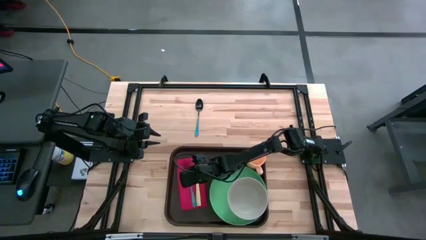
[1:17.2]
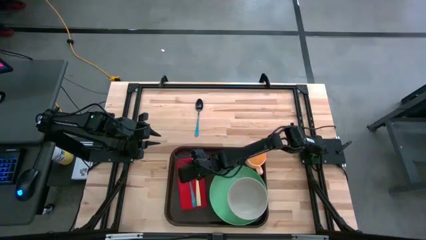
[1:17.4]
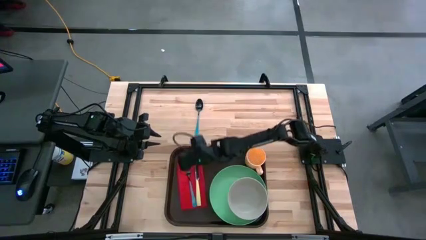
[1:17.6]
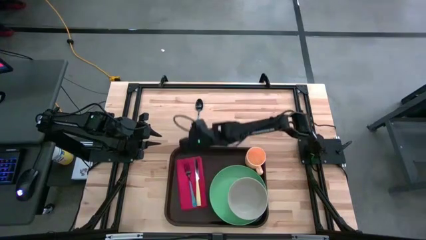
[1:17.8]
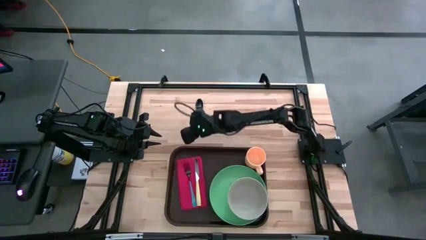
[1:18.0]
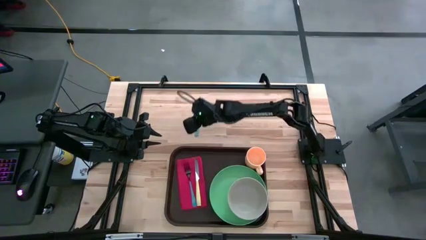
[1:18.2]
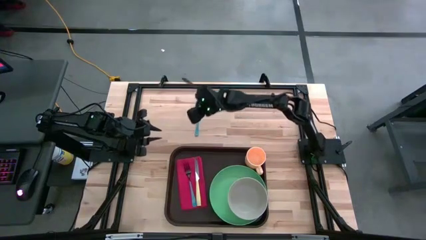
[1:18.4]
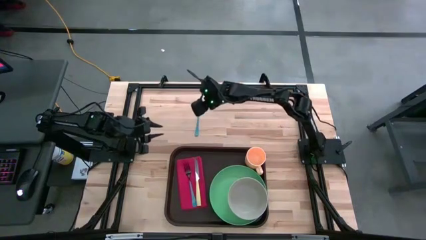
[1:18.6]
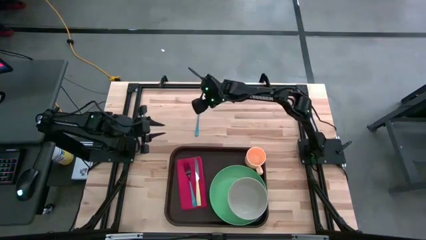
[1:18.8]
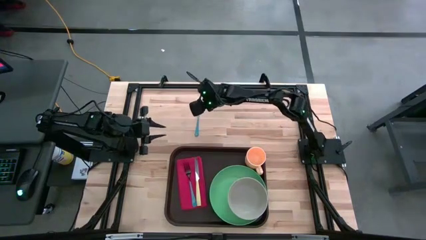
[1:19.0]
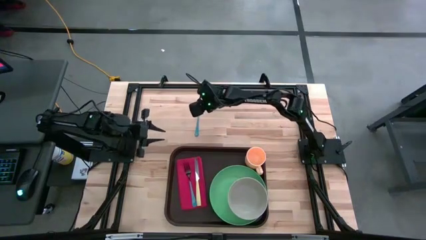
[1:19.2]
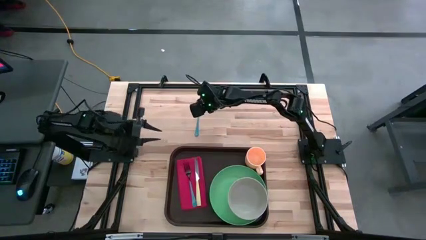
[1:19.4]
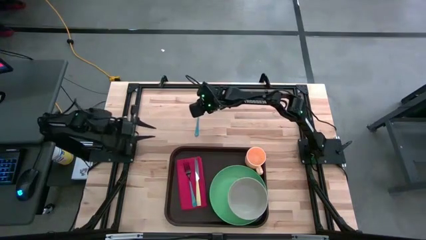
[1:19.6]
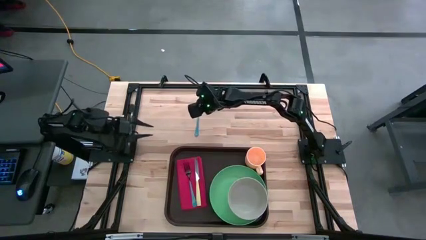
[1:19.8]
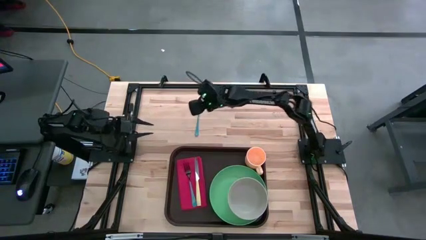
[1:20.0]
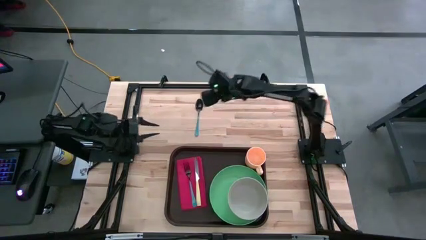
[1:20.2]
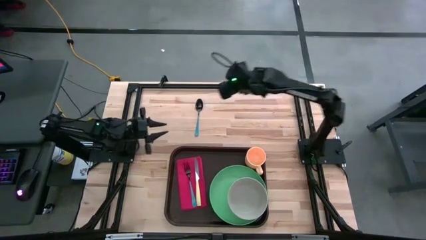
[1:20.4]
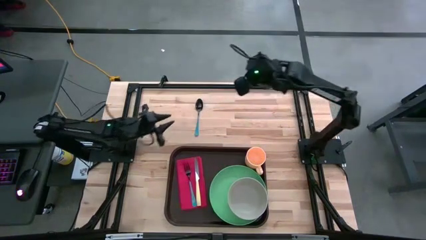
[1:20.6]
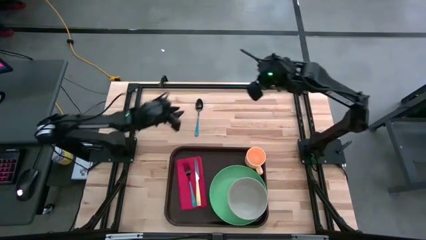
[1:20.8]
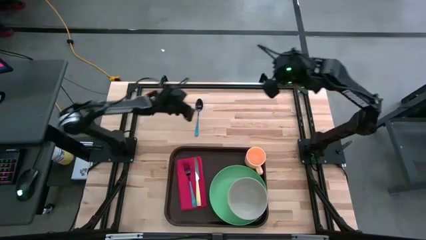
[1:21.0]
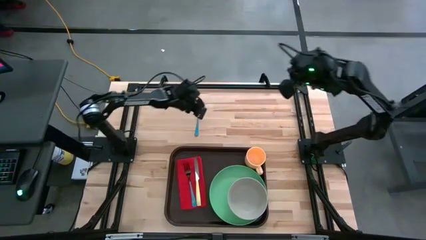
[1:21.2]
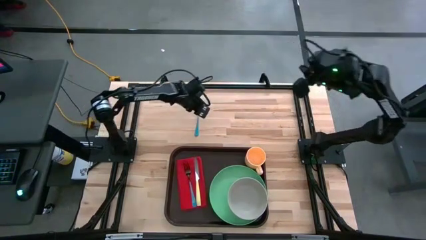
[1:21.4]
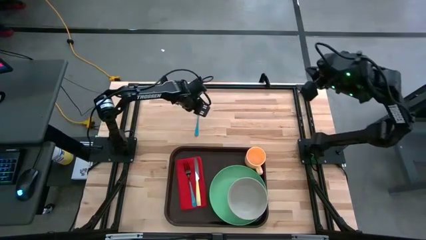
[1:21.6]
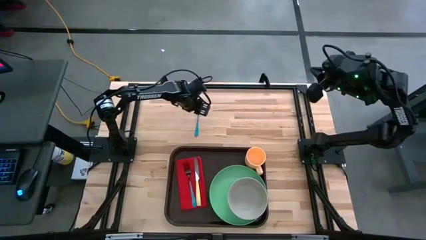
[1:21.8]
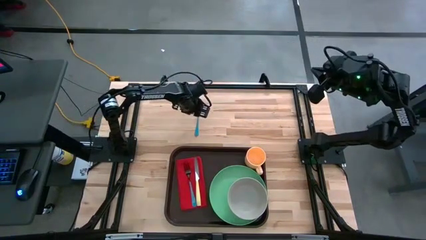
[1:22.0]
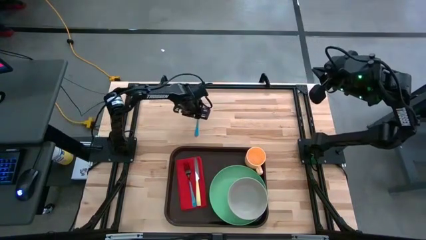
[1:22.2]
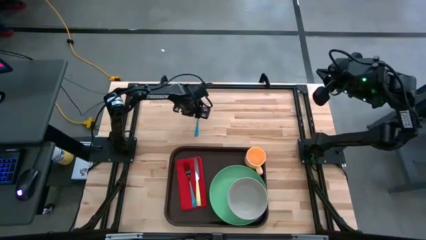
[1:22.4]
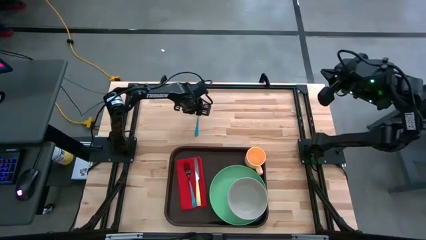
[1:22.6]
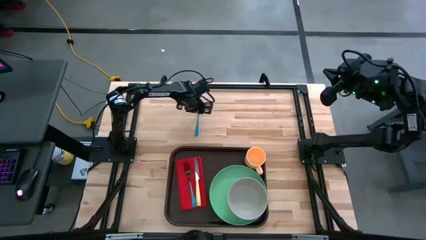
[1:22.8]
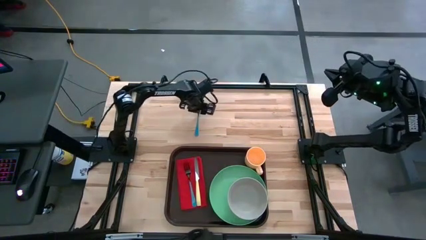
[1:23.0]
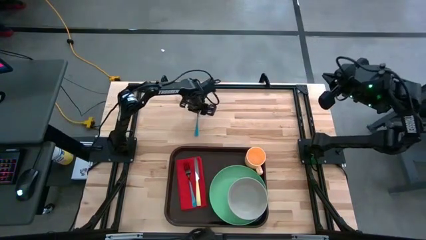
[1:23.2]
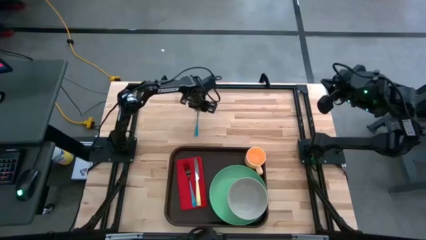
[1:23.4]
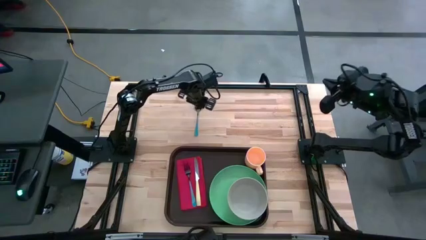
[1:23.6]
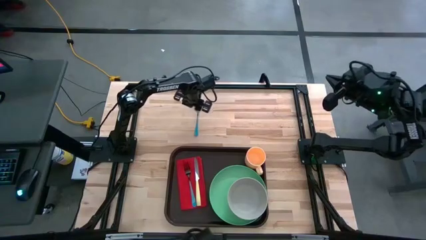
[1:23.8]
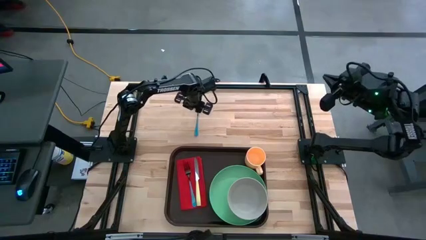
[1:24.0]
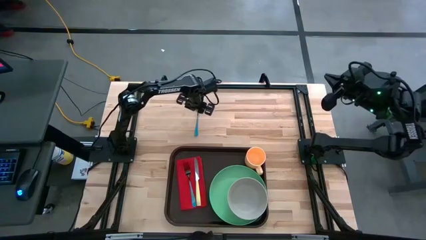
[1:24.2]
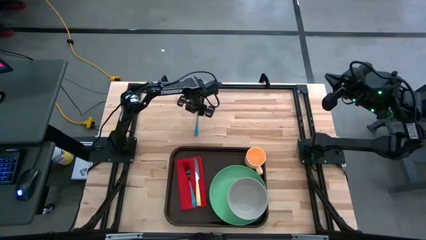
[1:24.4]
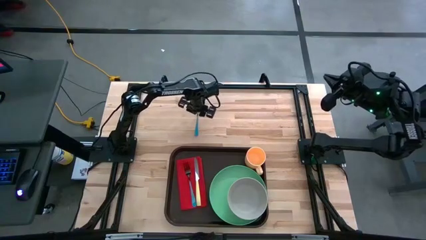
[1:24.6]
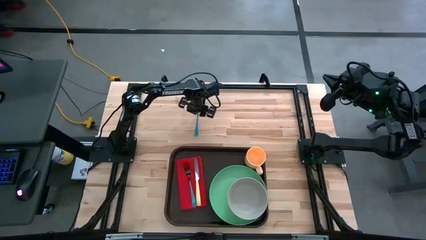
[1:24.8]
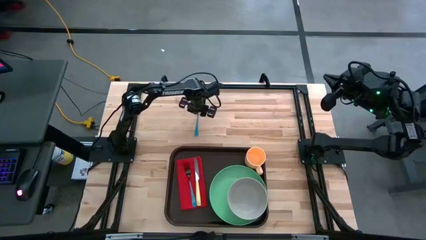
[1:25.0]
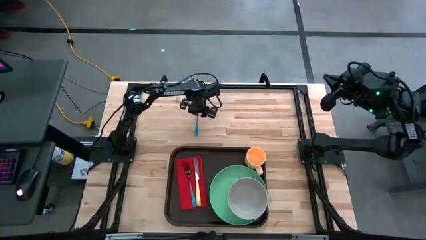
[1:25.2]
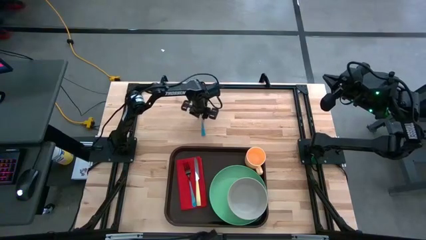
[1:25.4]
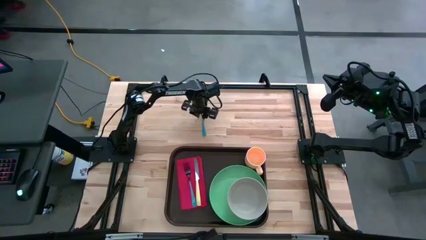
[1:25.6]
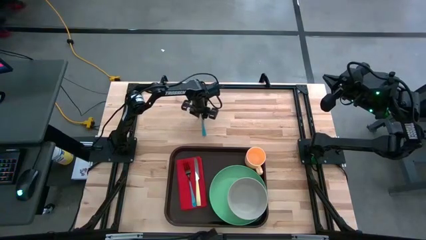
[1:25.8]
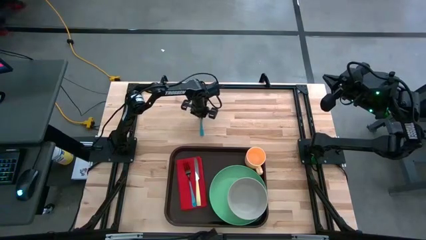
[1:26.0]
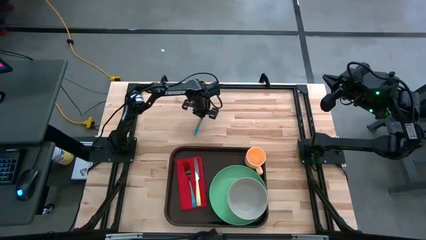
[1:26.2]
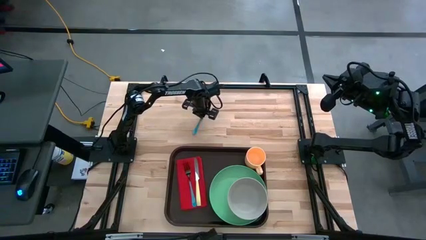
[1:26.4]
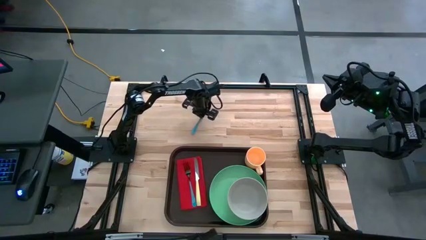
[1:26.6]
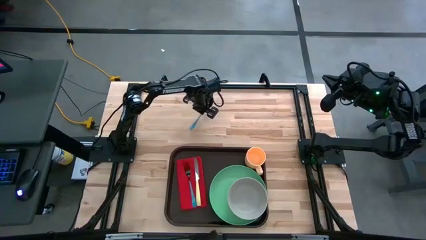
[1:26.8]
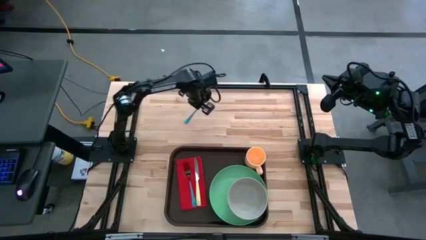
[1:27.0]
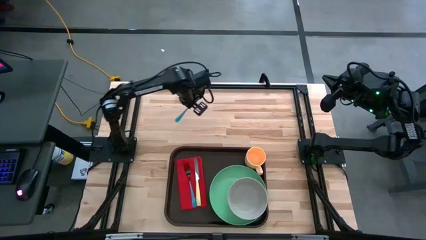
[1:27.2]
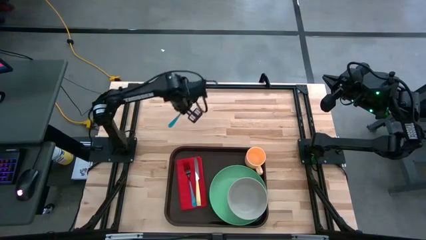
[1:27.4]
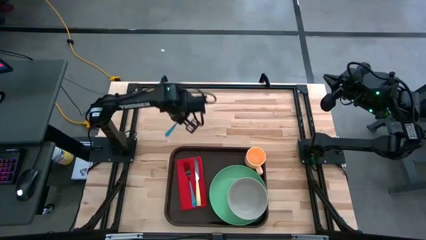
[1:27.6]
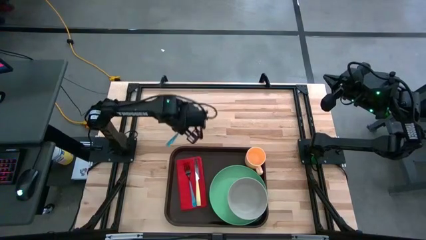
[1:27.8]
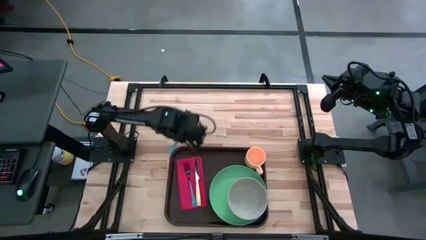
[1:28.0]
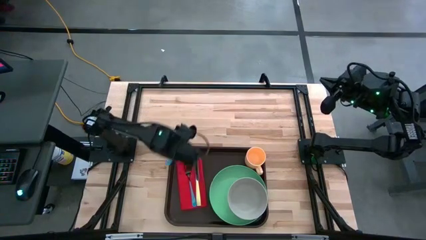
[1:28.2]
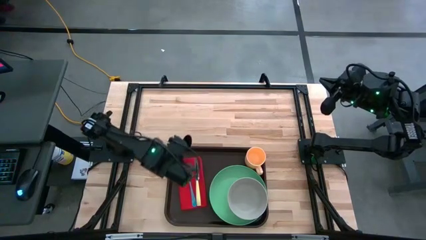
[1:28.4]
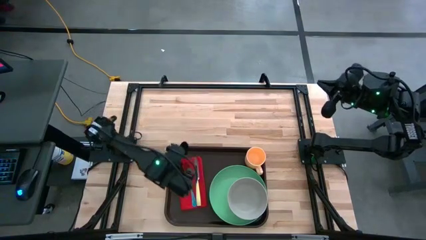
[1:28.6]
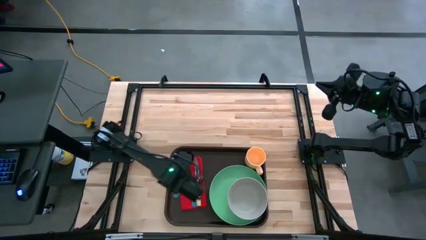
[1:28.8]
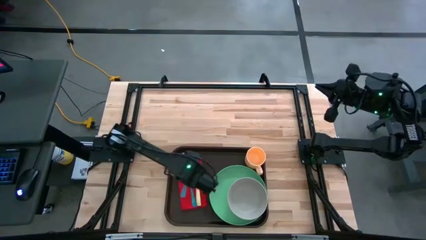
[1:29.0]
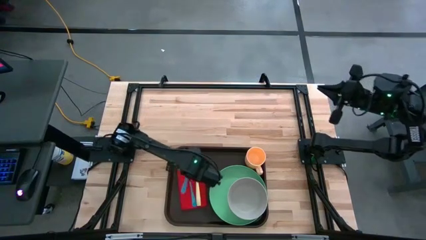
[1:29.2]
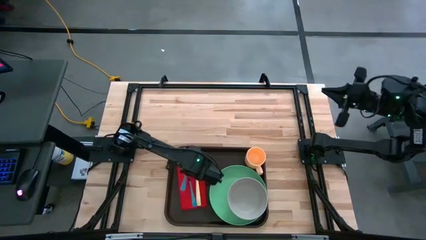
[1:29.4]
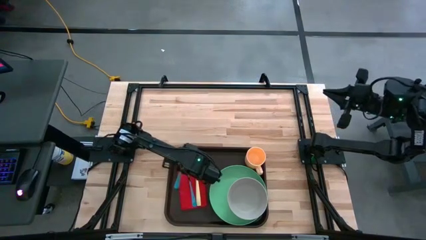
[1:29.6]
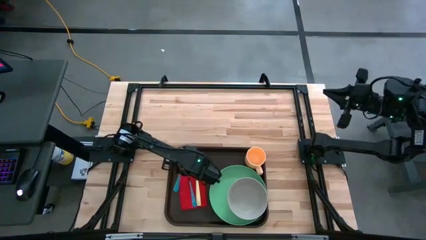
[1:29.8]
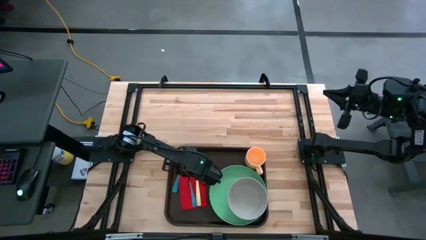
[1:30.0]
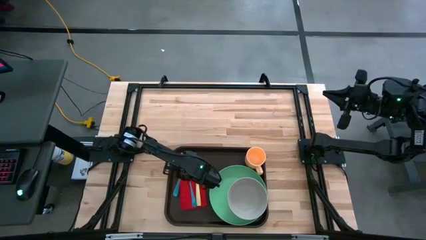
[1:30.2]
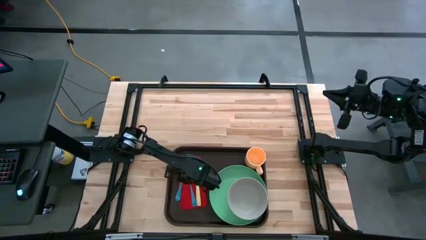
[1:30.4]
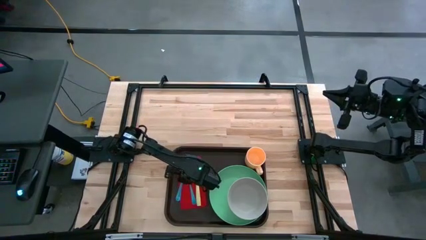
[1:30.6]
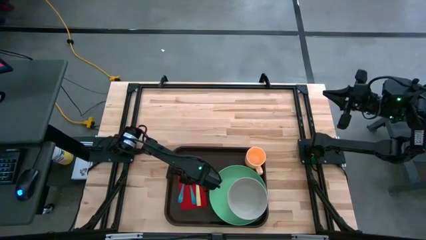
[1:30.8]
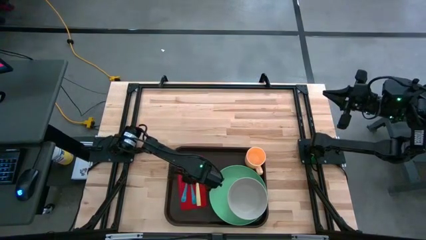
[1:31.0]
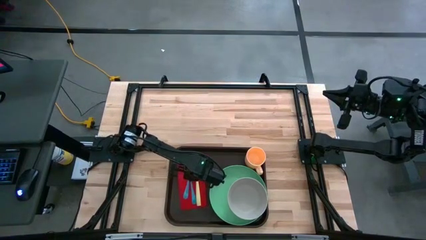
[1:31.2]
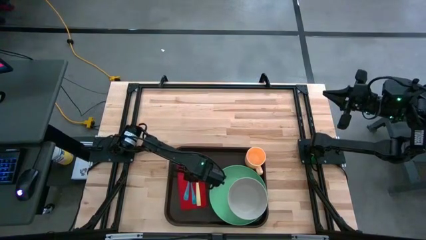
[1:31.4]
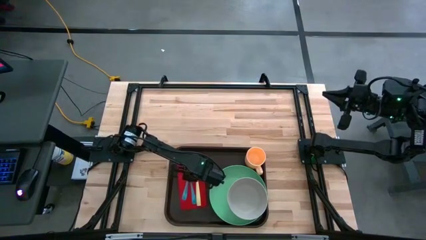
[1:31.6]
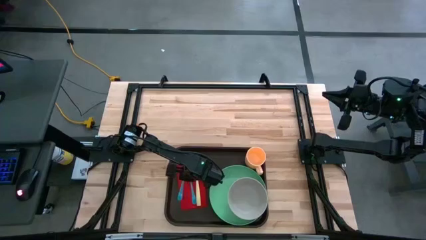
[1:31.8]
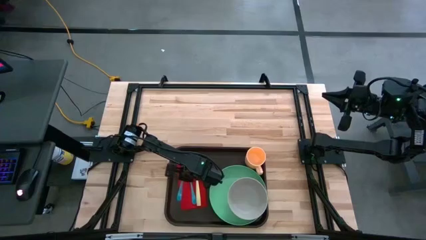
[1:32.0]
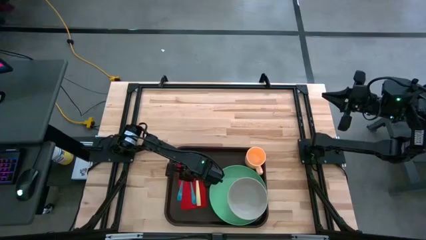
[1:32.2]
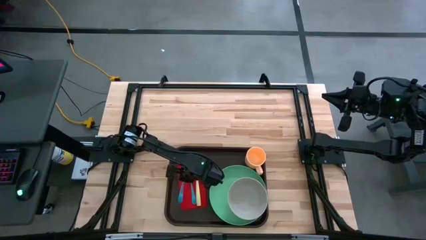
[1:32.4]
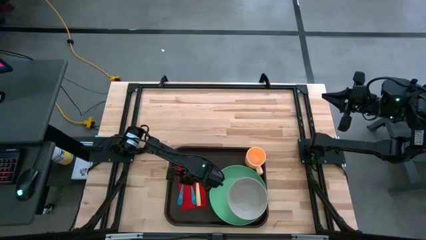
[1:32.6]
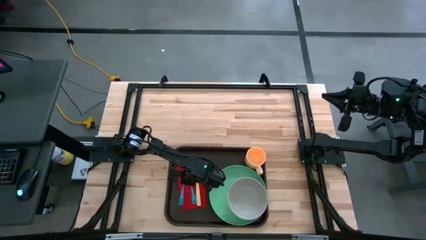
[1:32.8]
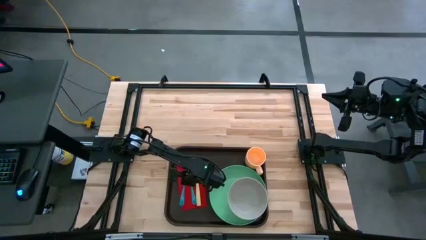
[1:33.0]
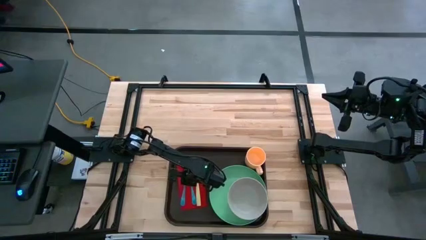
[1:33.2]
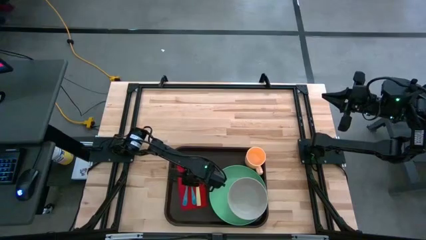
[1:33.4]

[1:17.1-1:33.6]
Task: Set up tray
Put the blue spoon on top of the red napkin to the left of the blue fork
